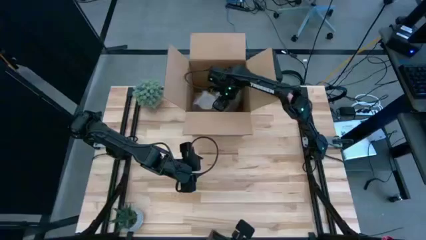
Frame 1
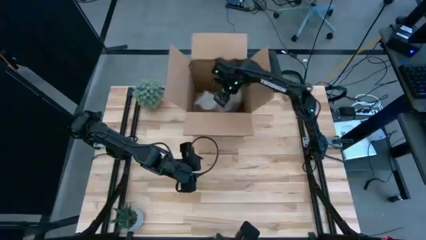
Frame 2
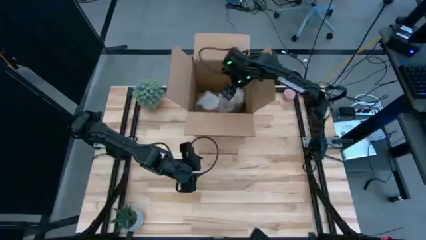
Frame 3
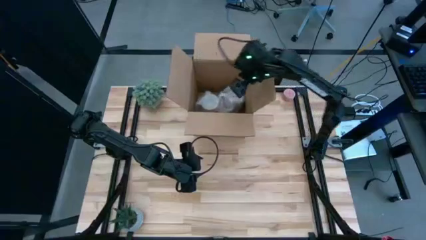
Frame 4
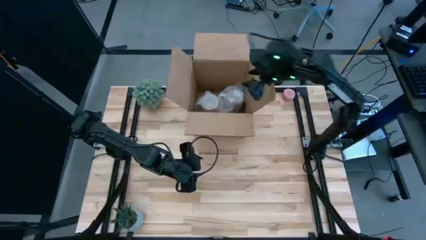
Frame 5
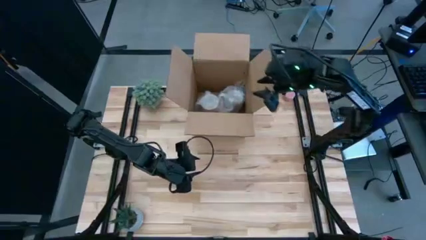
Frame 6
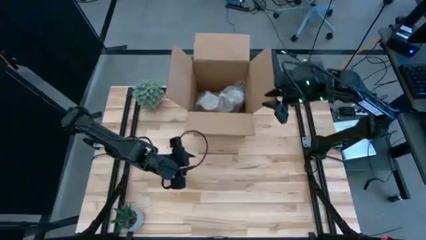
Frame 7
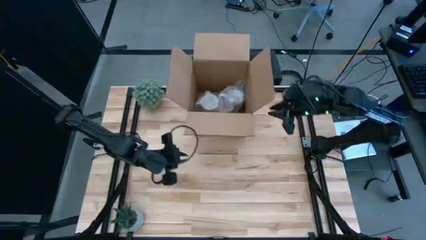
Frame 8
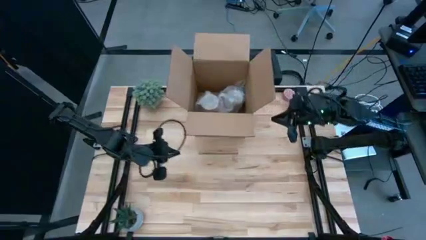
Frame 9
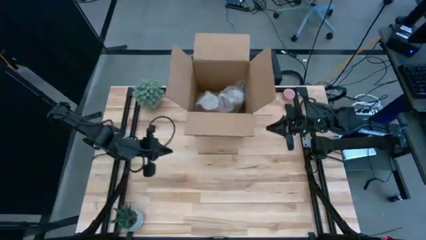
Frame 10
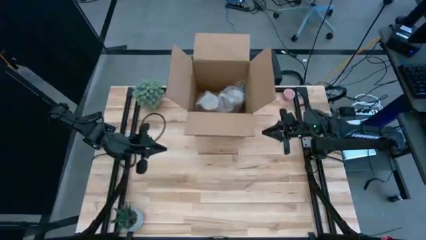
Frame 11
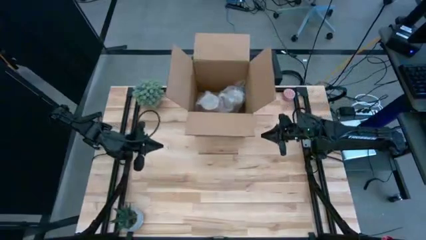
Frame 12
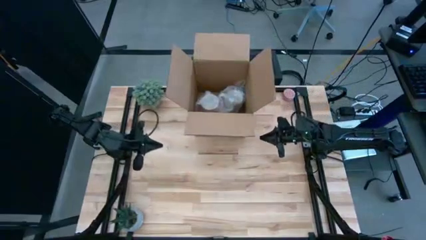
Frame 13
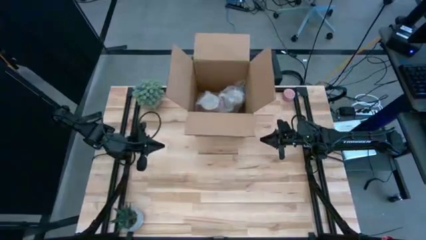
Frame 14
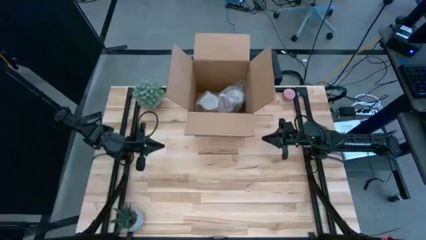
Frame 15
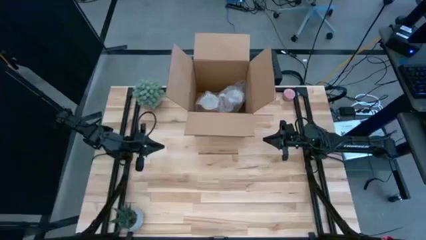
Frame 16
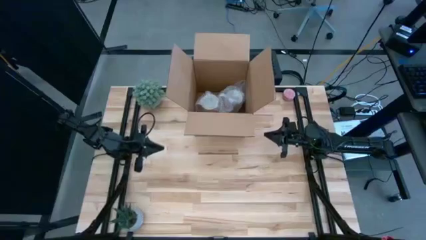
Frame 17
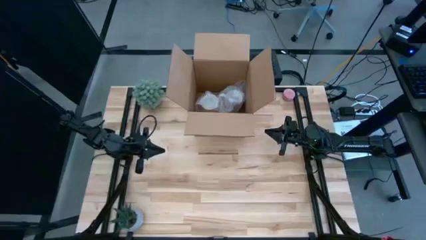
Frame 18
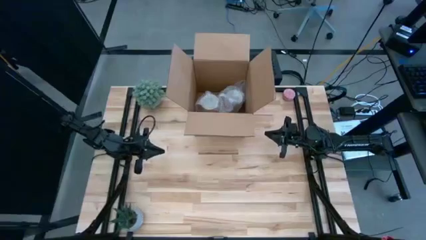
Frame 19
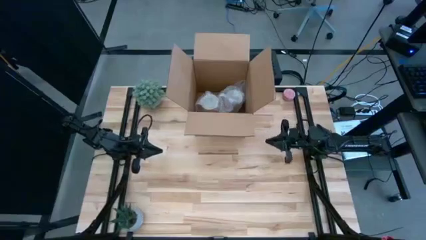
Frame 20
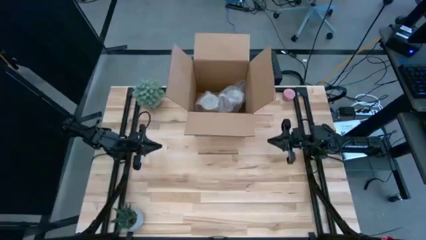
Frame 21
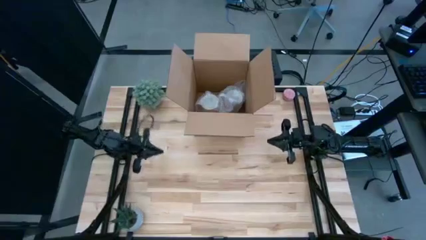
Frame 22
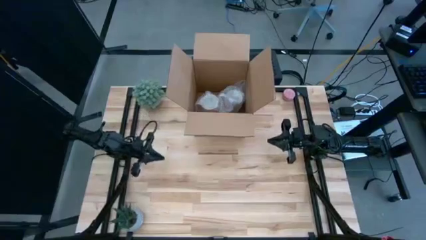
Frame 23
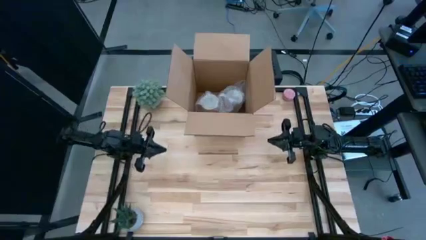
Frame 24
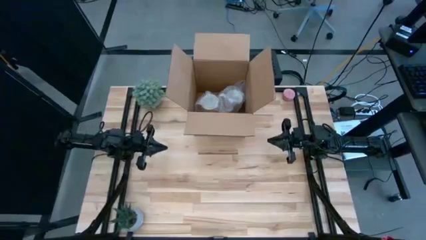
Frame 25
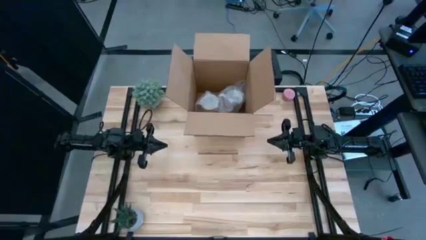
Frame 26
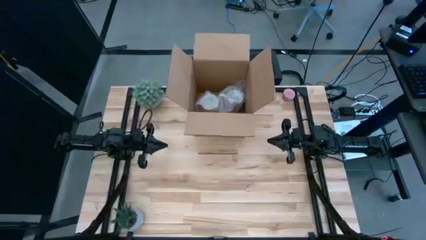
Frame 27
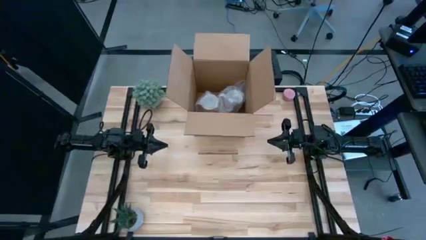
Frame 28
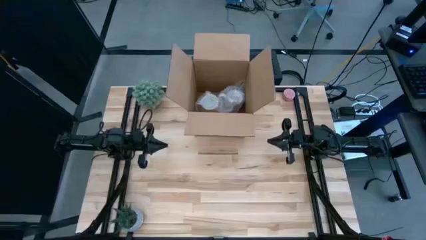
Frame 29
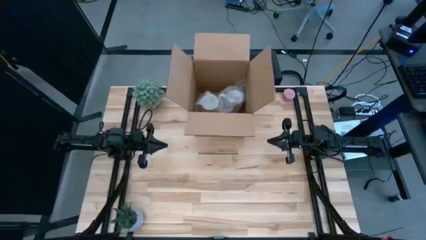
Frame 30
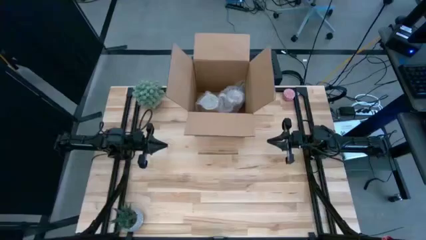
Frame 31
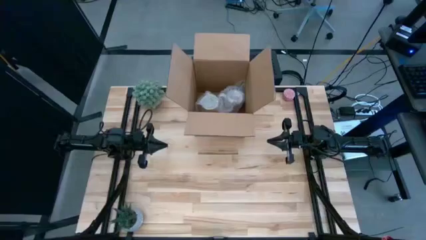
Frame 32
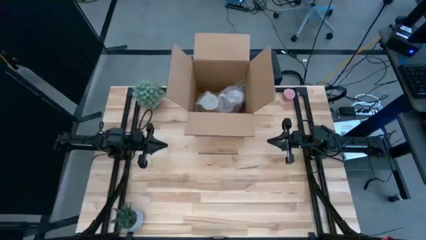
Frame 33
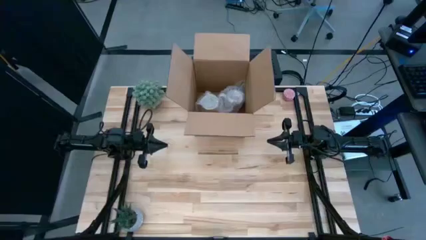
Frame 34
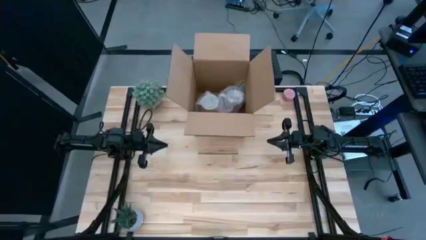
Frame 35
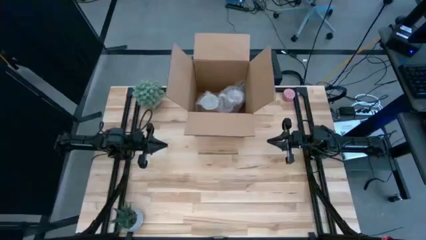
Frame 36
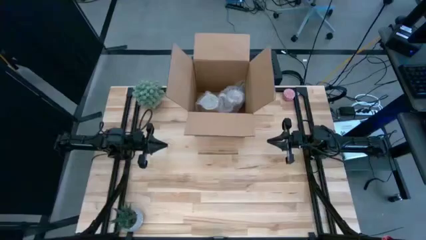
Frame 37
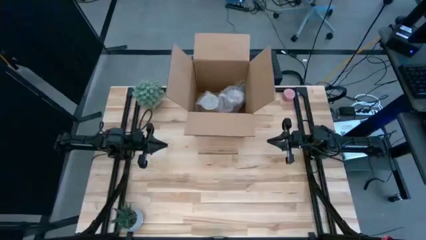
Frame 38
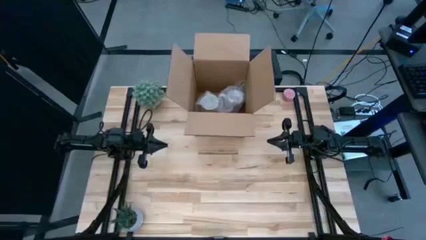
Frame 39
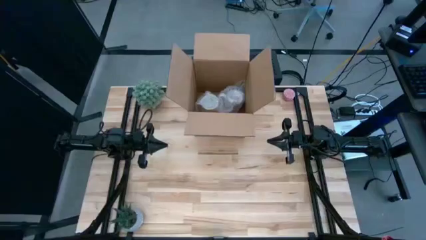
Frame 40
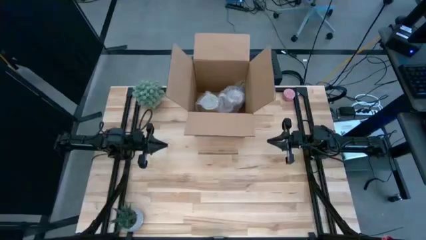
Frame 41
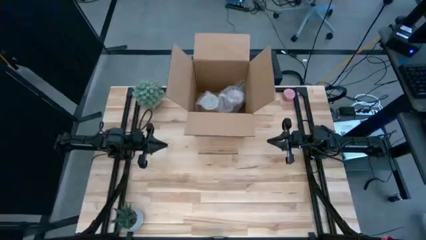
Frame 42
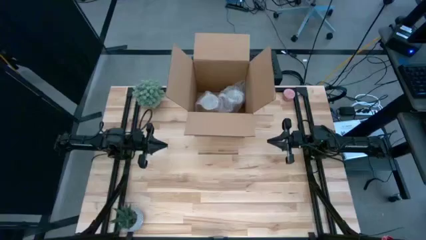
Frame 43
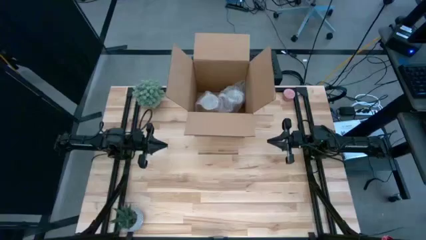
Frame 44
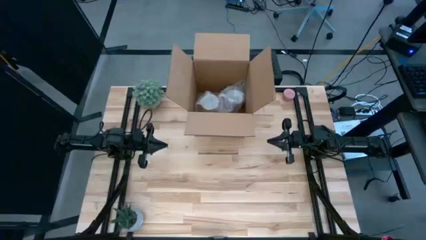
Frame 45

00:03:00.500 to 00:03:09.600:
Task: wrap mug
Return to Home Position

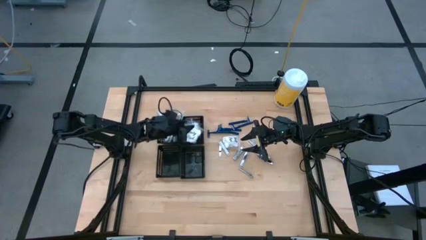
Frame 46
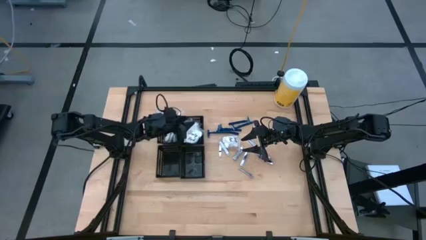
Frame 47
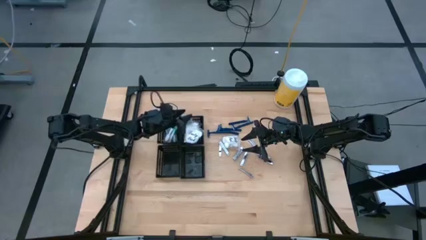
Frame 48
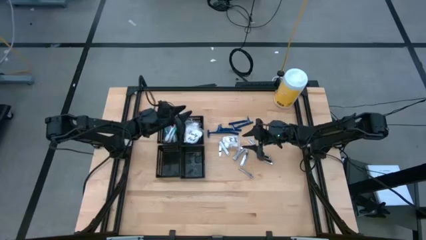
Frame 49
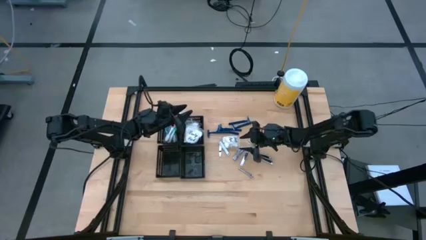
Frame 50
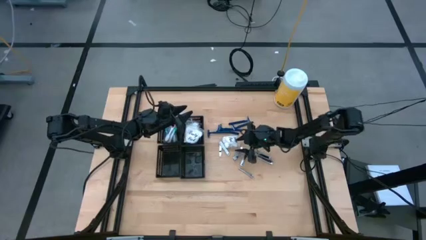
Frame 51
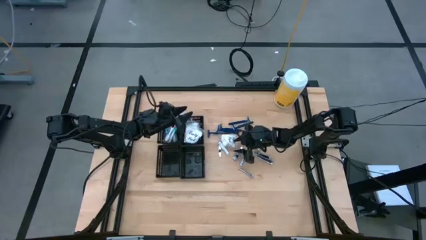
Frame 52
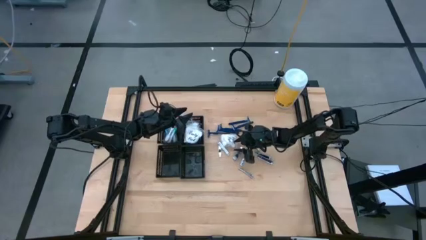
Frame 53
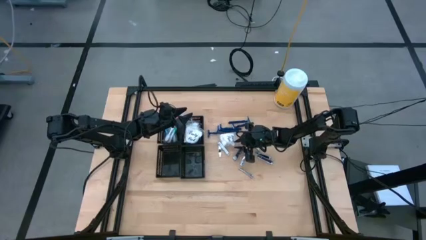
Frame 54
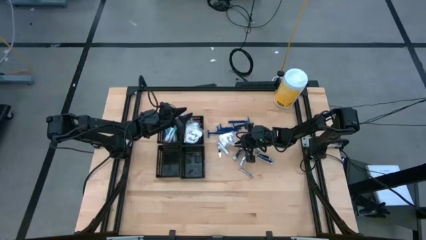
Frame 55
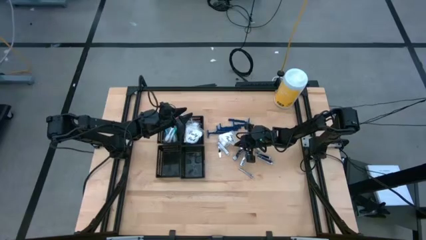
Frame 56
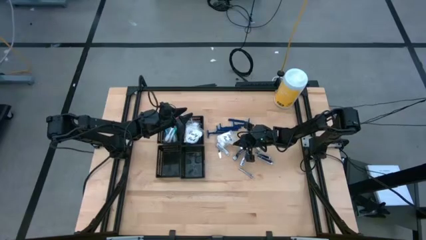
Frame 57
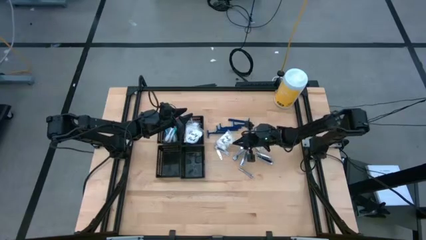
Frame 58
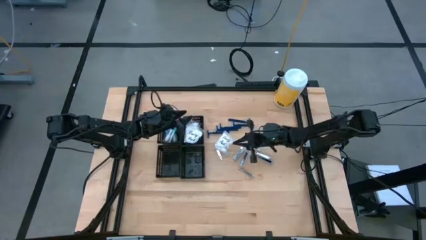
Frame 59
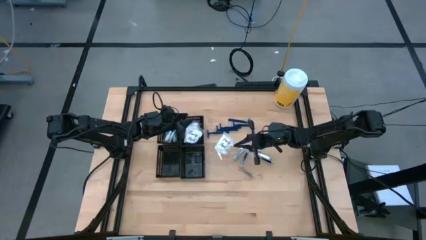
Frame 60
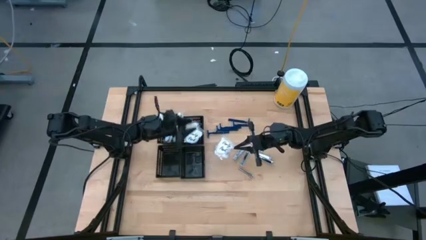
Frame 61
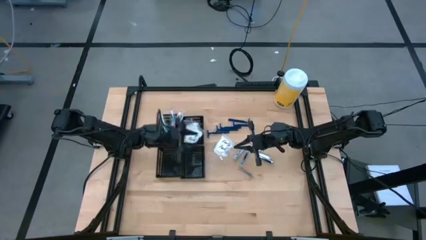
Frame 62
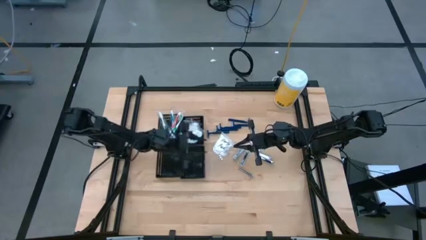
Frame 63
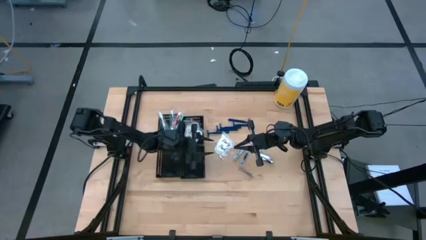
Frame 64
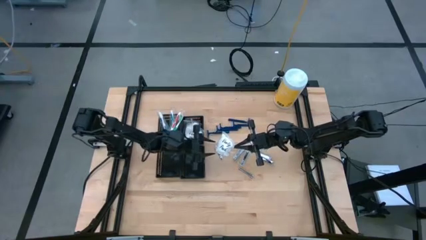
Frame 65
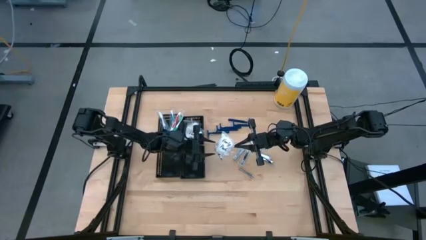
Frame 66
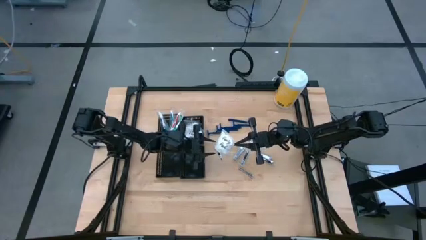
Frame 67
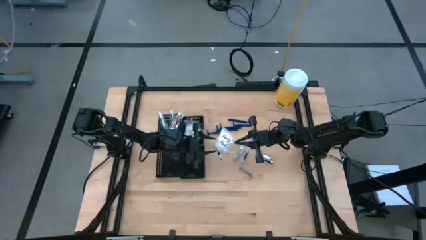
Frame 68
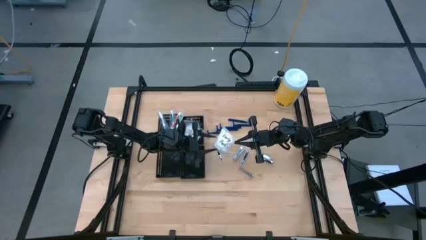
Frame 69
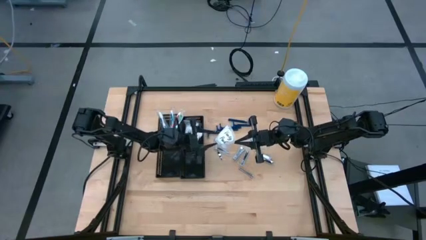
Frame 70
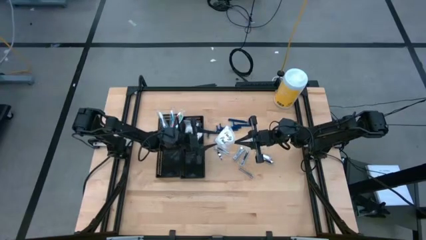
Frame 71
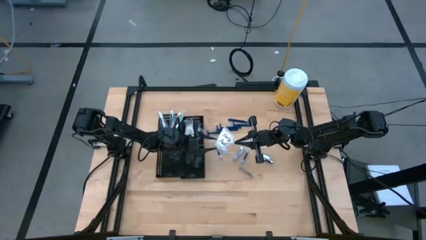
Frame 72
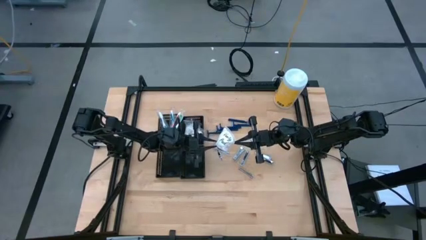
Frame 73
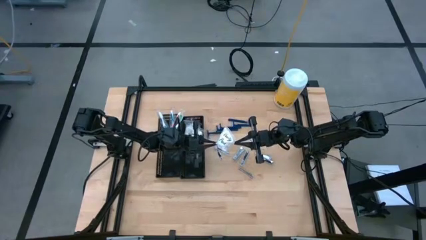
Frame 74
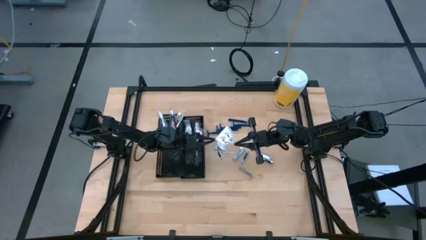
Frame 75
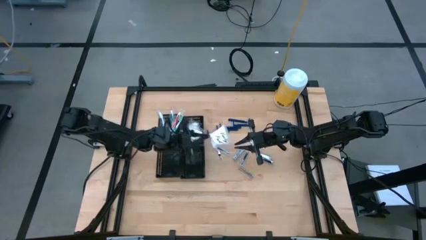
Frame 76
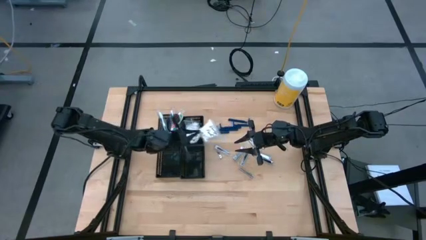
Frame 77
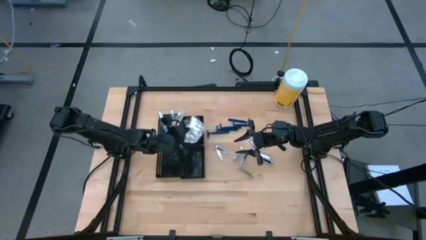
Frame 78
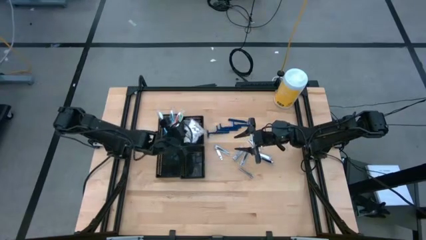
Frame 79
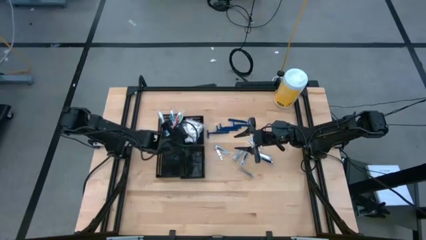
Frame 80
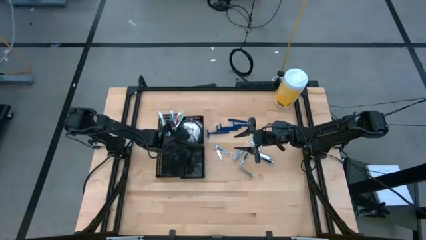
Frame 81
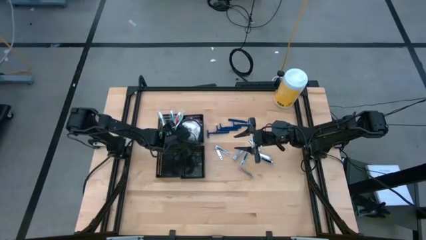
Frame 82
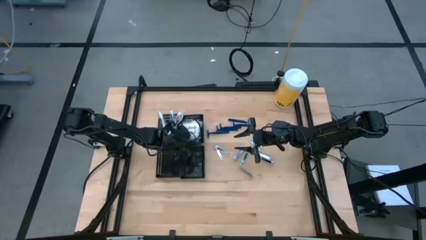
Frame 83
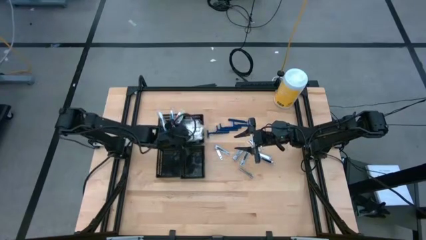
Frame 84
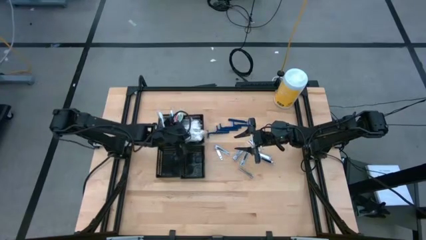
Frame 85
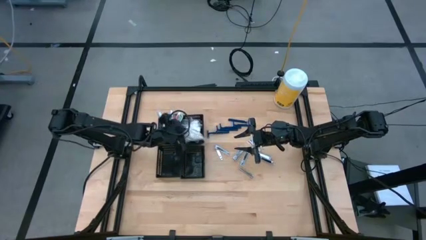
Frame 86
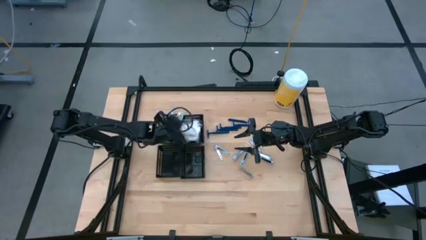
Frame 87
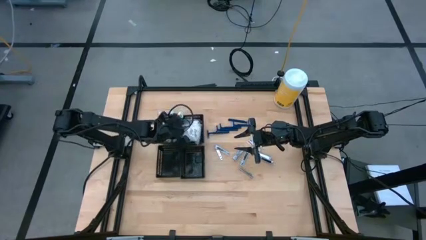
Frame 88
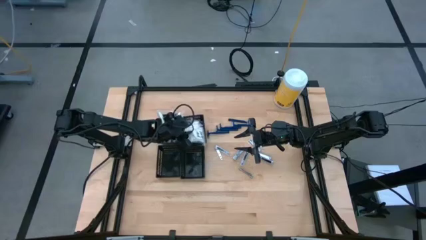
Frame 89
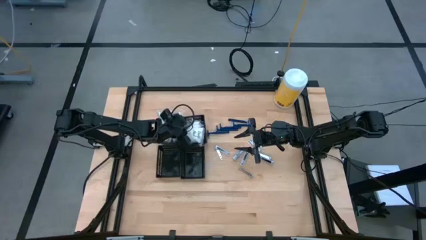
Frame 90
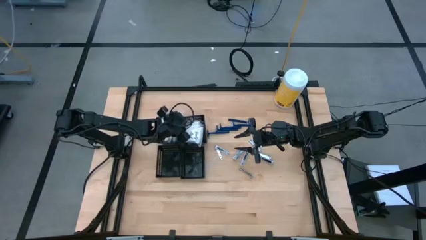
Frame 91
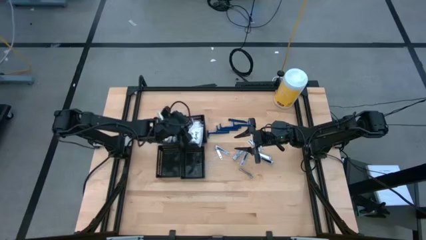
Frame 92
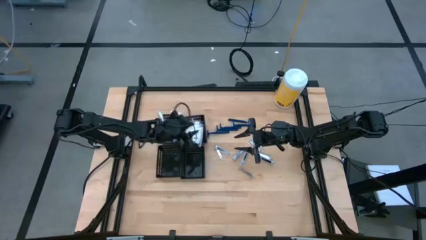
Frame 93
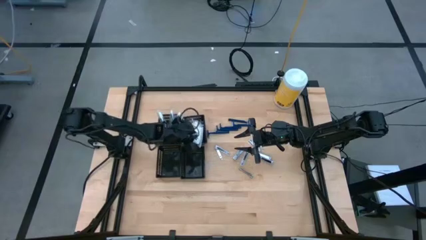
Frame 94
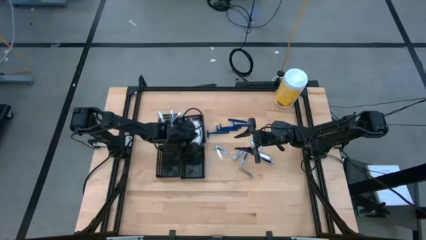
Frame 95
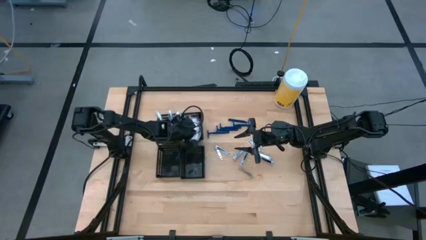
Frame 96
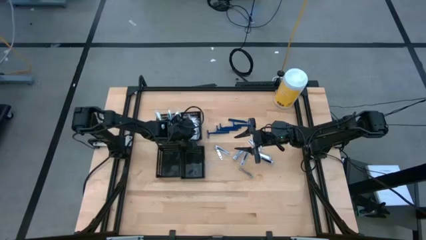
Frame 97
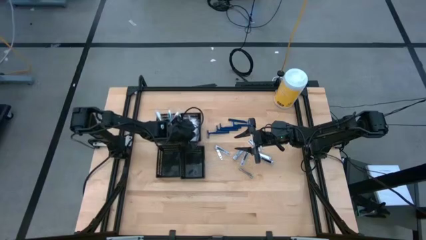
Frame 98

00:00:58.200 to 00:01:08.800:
Task: Pick & Place Travel size toiletries
Put the cotton pack into the top right black bin
